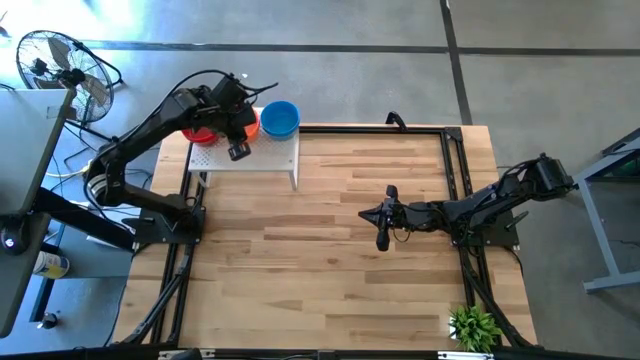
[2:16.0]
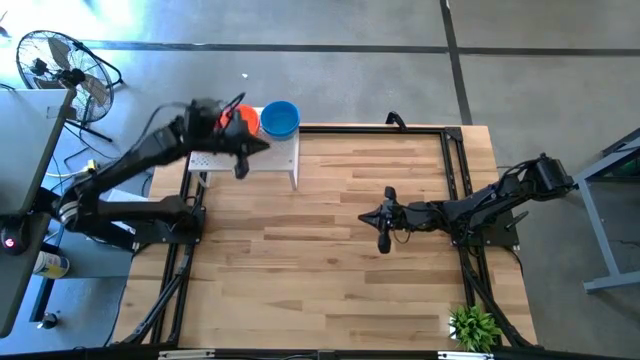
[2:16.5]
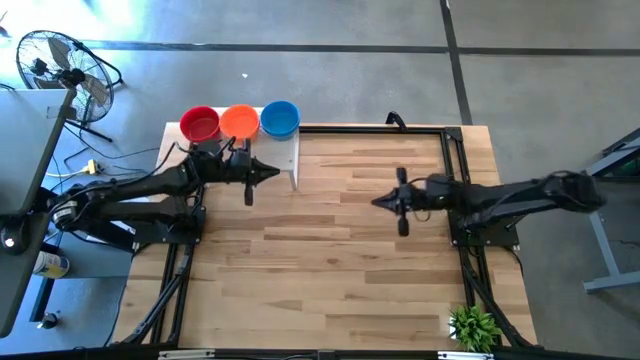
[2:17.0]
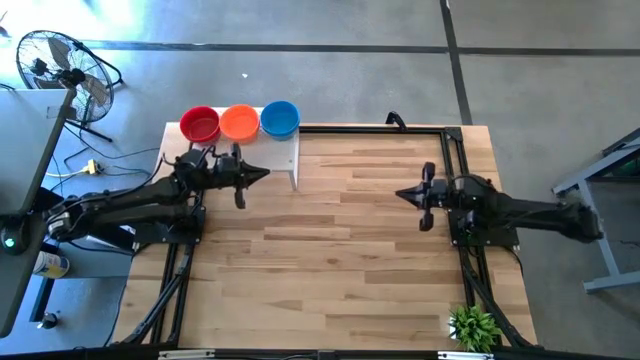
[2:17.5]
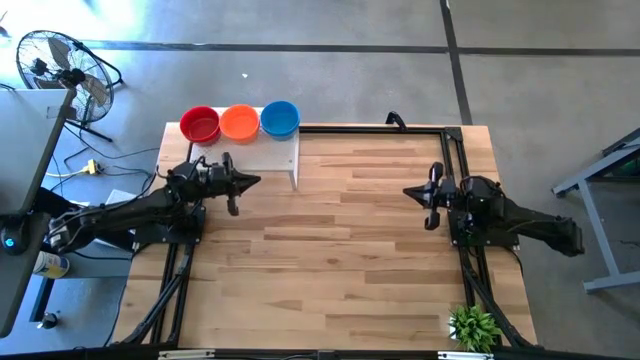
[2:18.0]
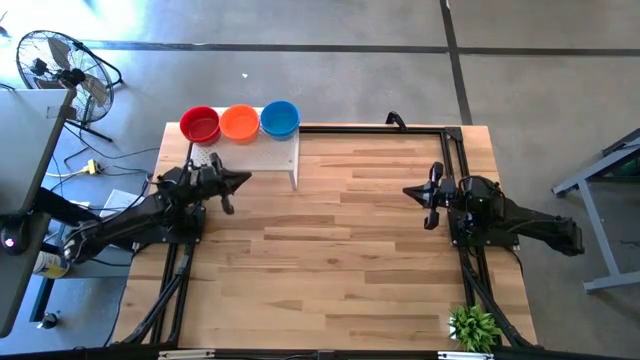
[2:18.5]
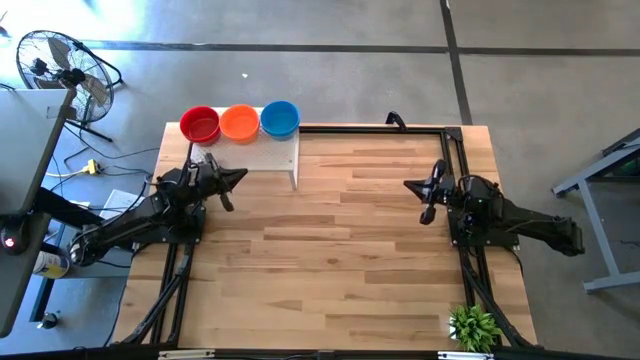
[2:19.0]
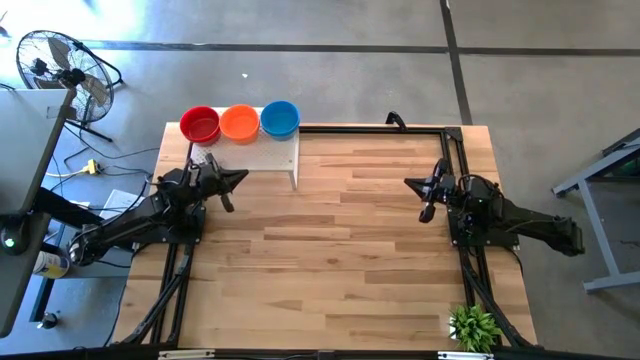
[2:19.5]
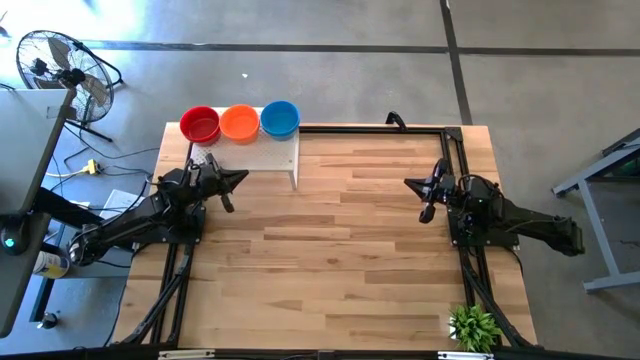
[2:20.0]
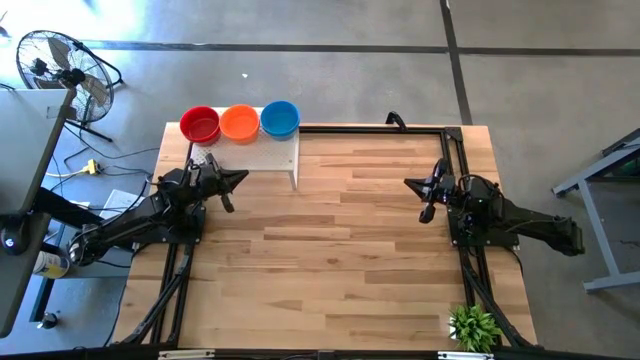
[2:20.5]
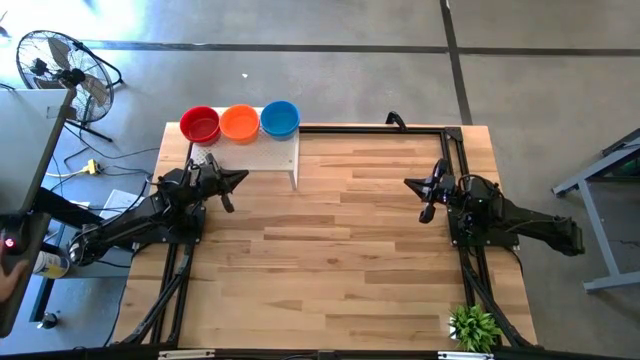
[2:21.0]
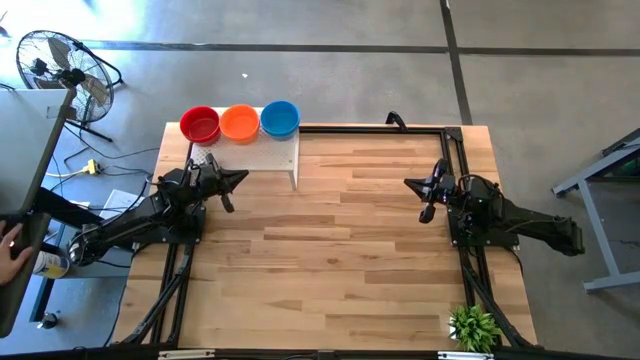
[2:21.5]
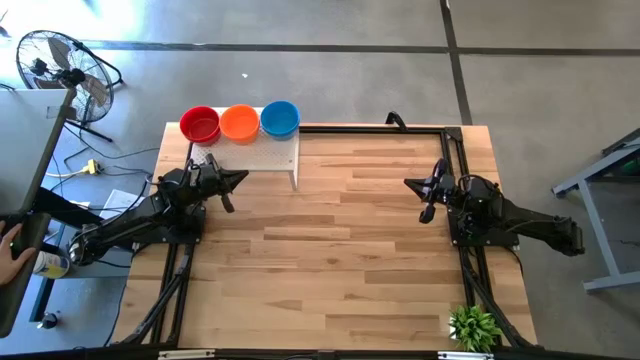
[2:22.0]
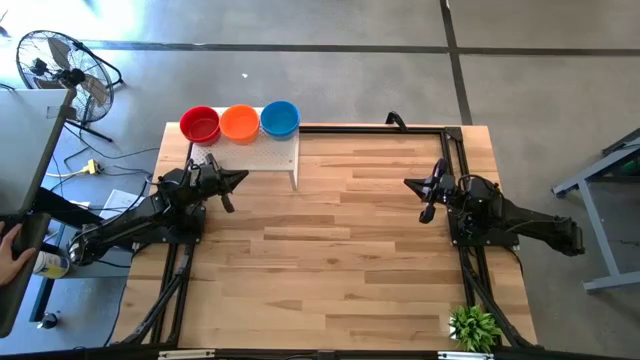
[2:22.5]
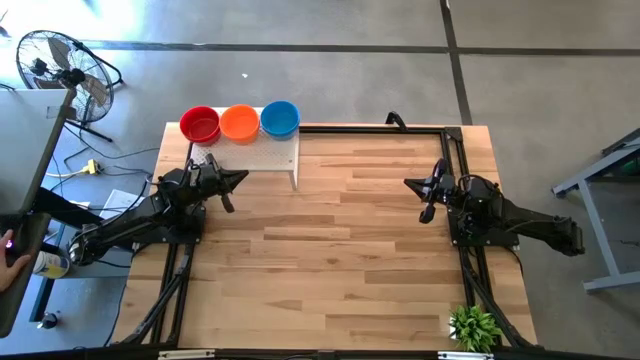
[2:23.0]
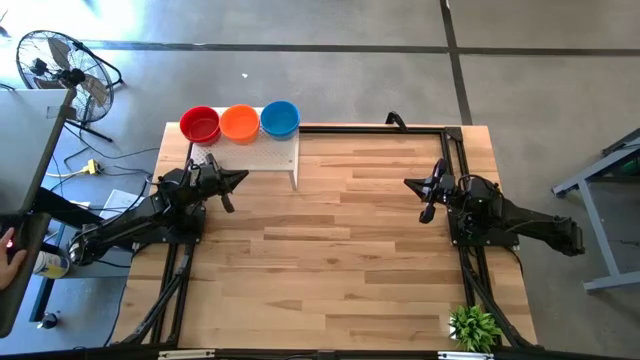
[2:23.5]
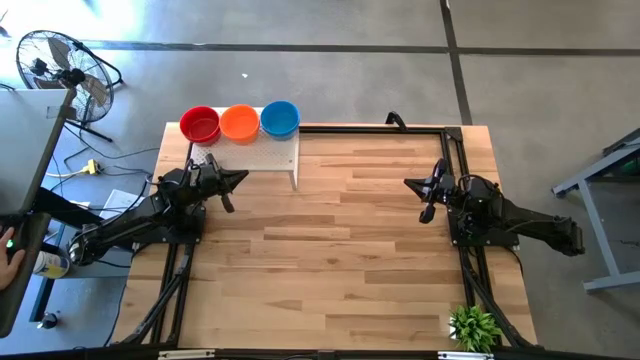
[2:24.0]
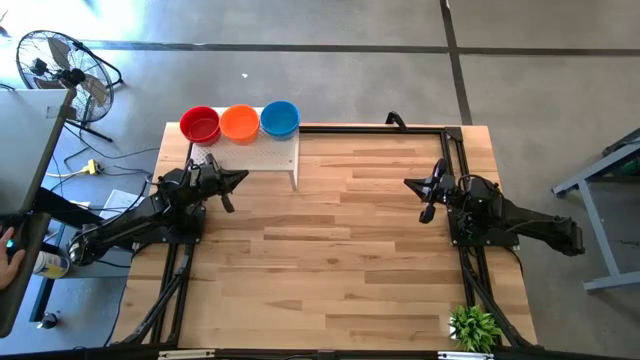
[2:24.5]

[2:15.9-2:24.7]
Task: Pick & Place Mini bowls
Return to Home Position

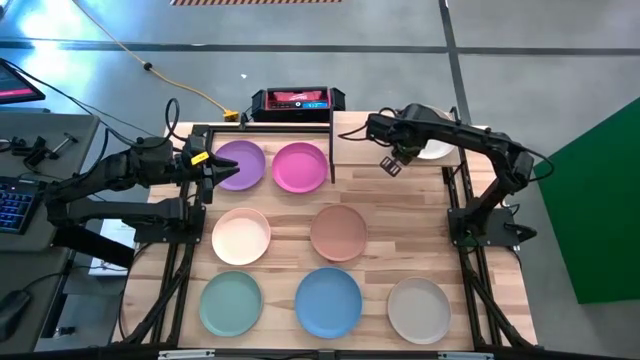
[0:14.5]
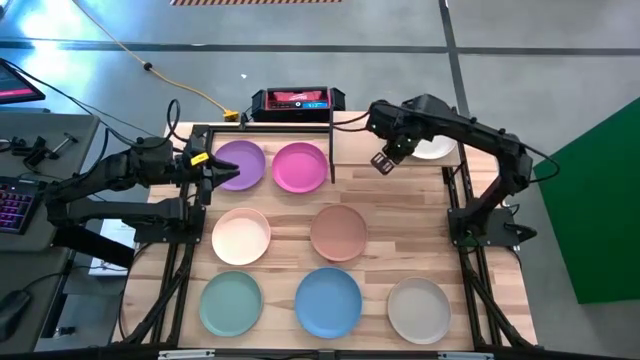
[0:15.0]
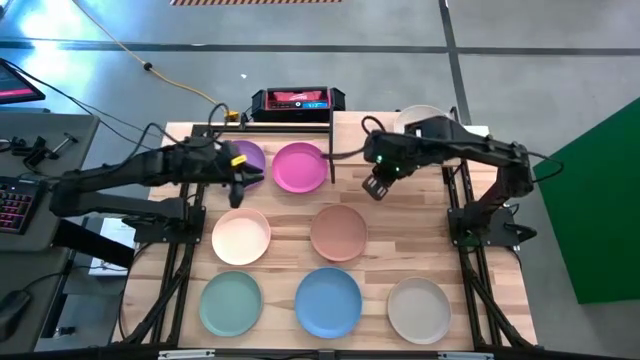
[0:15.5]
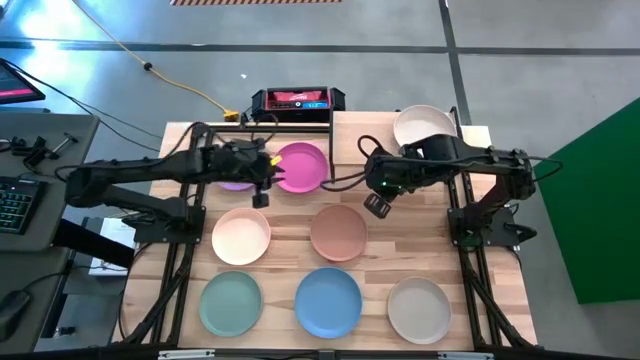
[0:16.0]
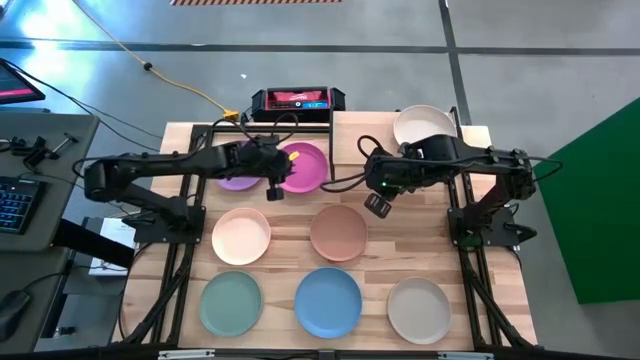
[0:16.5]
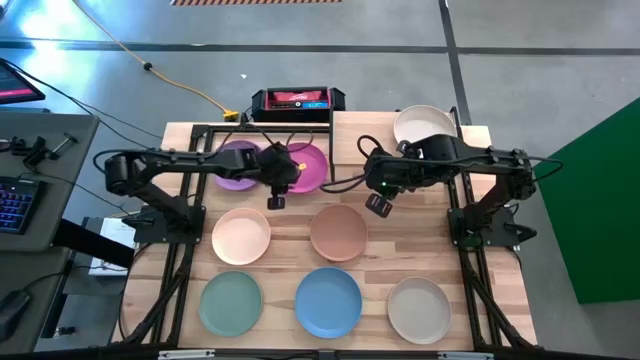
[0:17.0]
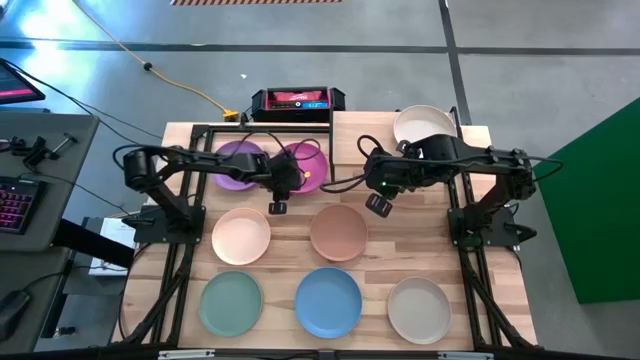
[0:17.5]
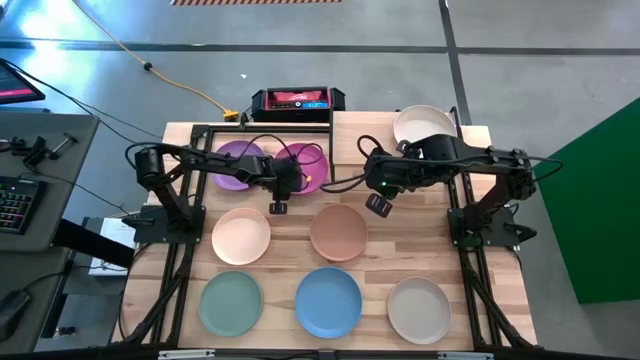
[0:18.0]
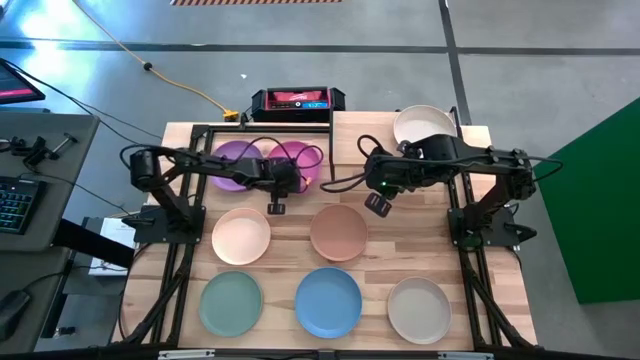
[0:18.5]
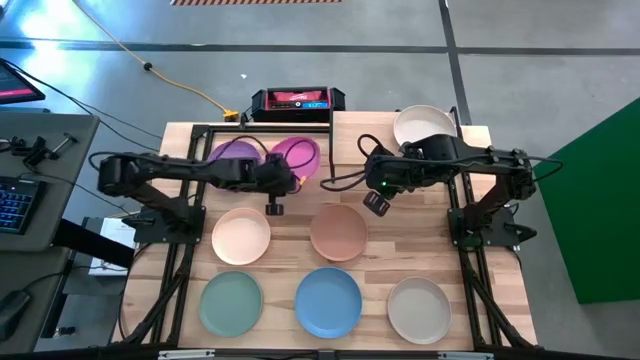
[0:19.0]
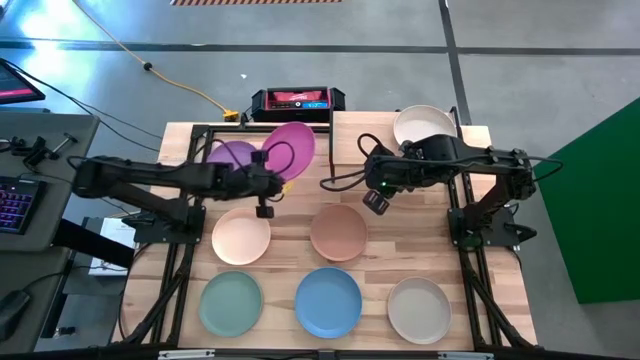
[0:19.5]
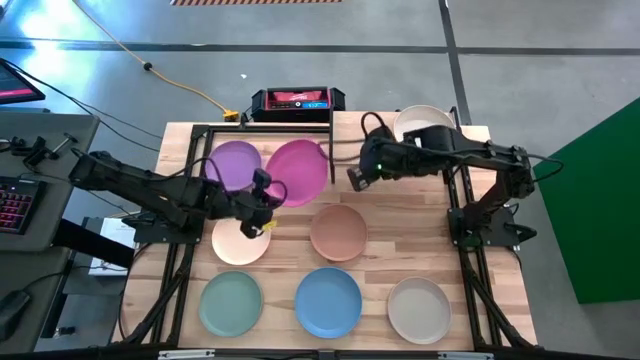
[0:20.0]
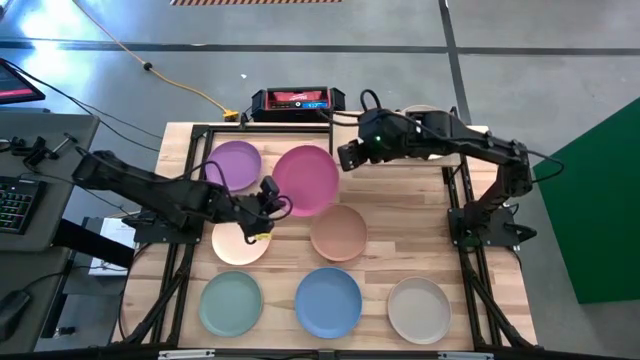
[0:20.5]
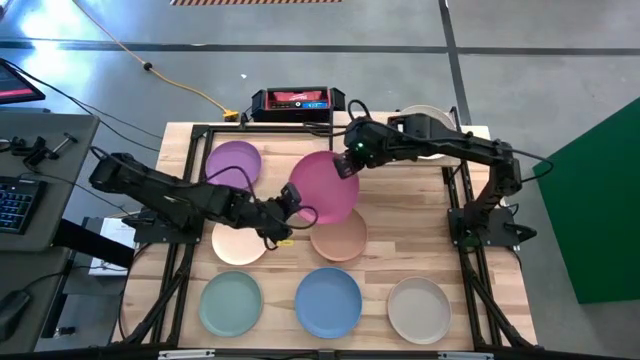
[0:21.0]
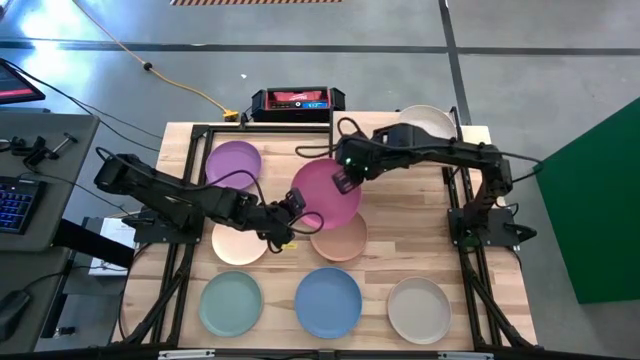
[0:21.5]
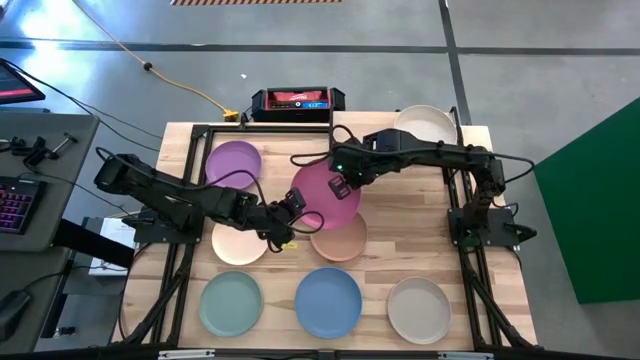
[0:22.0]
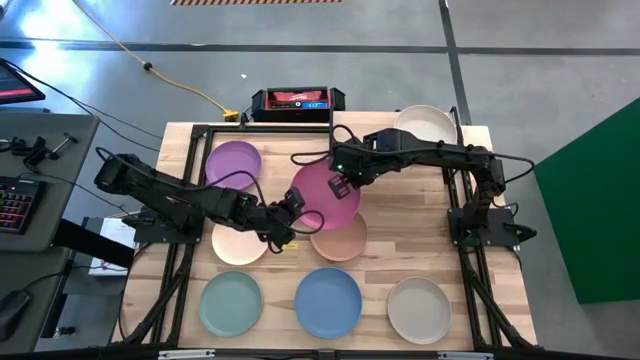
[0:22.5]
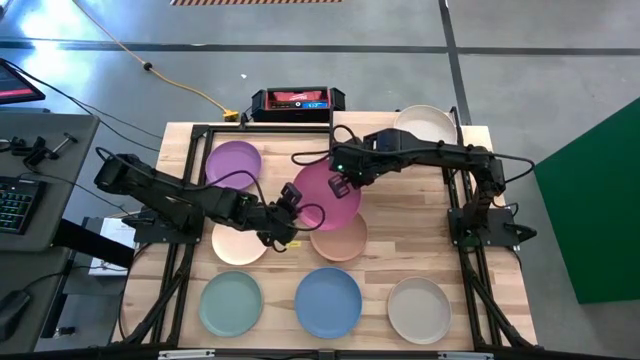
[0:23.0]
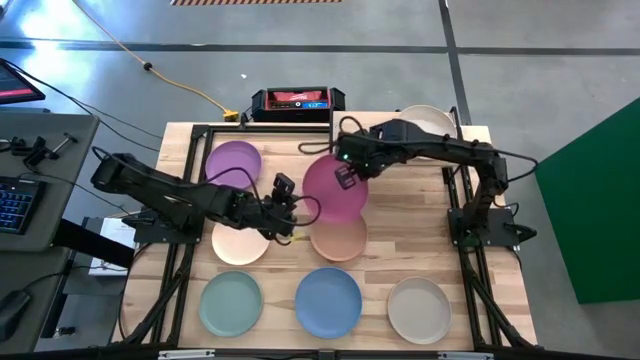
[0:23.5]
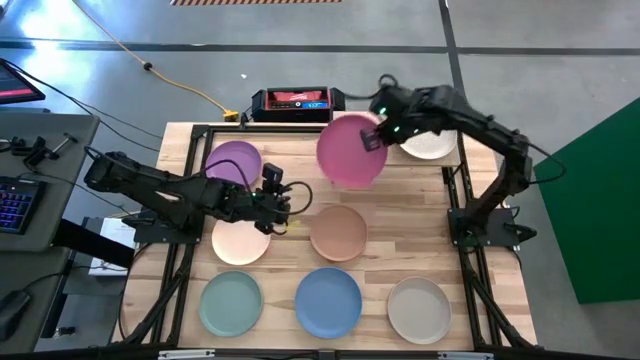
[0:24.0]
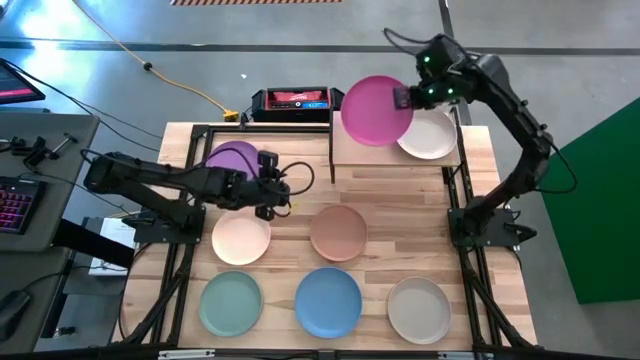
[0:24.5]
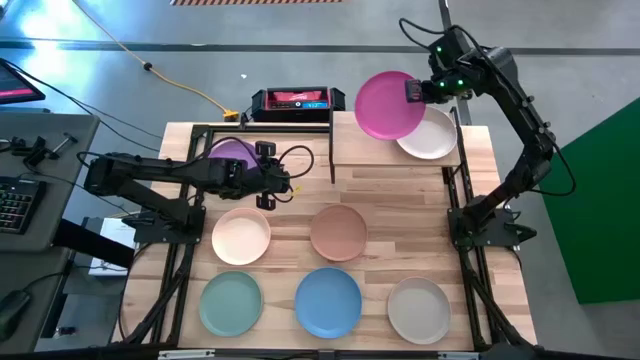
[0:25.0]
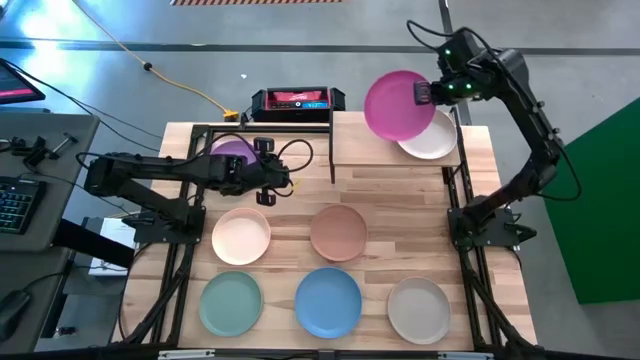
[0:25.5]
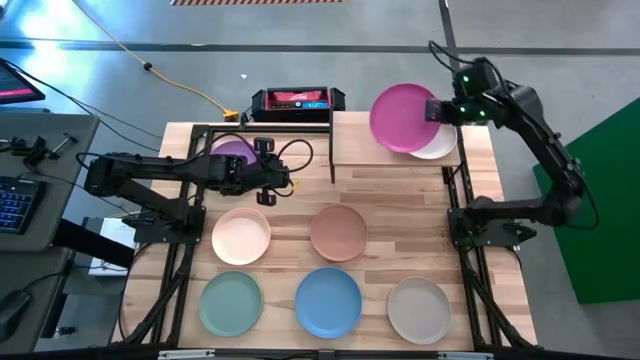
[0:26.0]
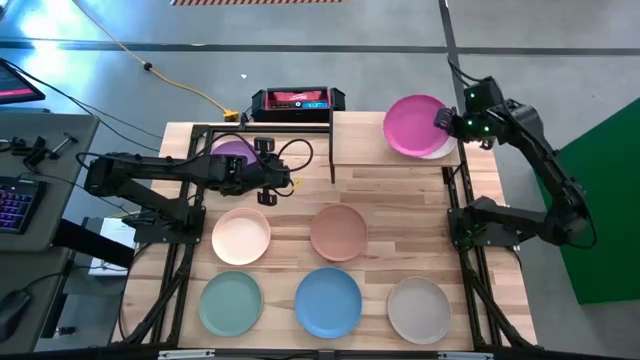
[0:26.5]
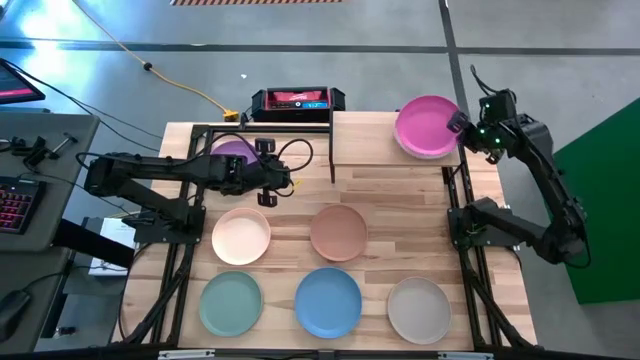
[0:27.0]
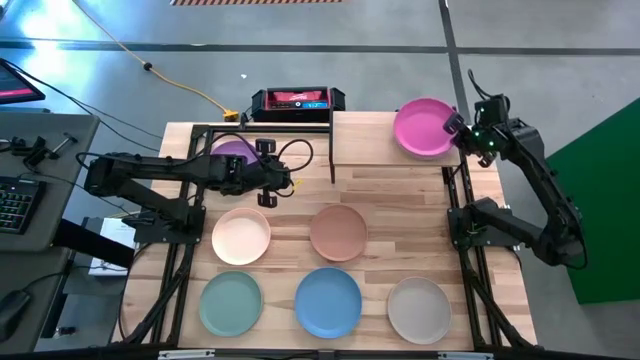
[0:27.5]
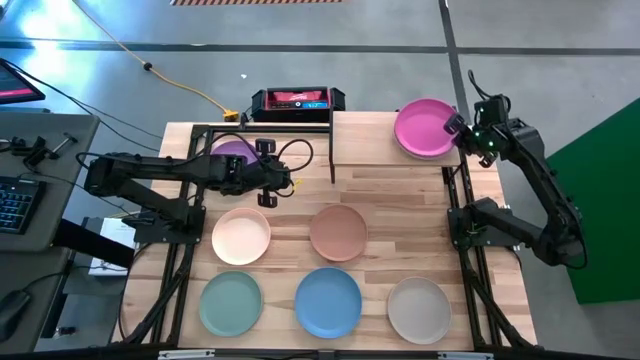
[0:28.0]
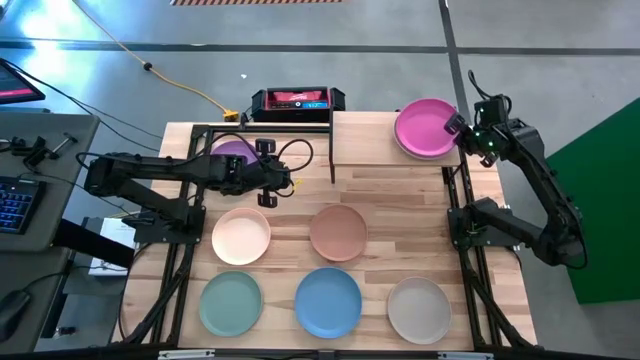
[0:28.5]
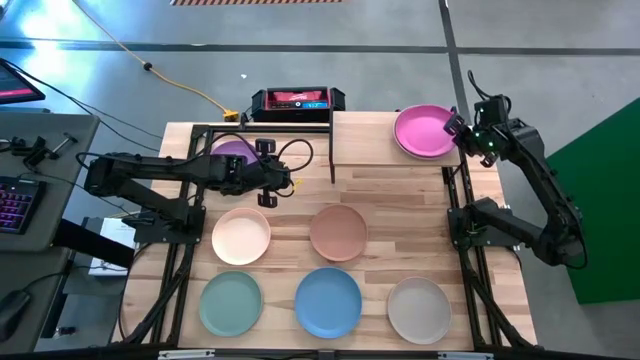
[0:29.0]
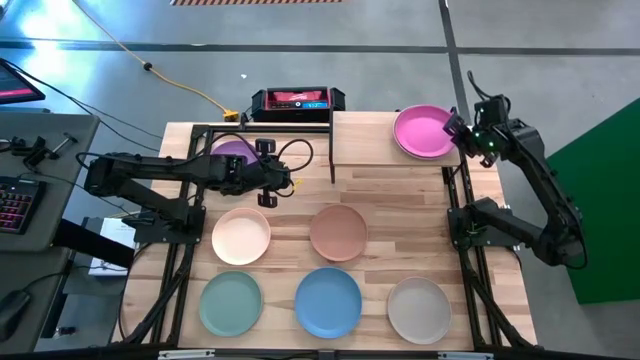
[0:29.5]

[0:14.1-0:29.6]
Task: Place and stack plates onto a shelf
Stack the pink plate on top of the white plate on the shelf
